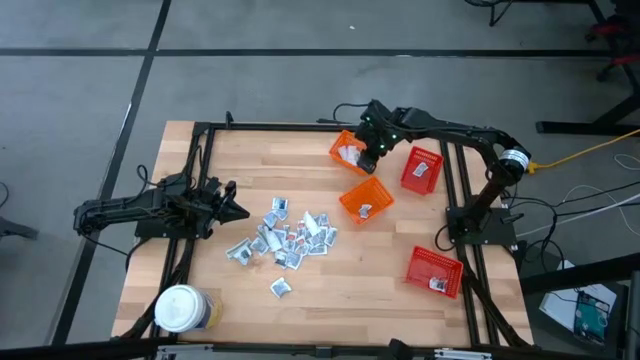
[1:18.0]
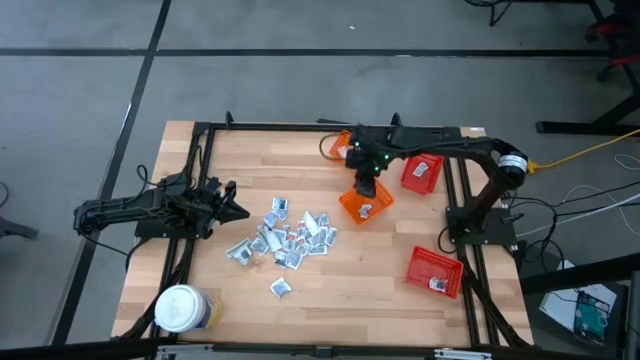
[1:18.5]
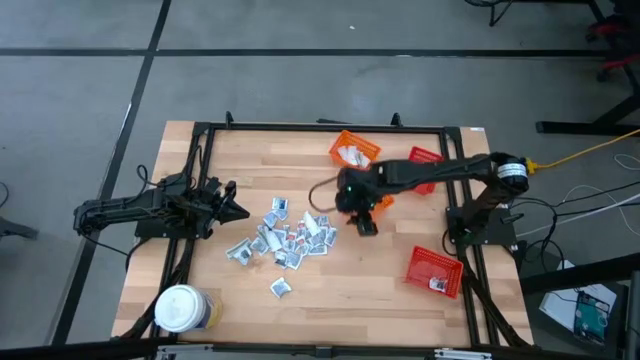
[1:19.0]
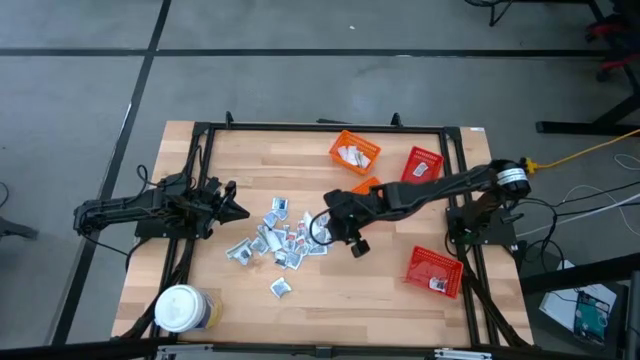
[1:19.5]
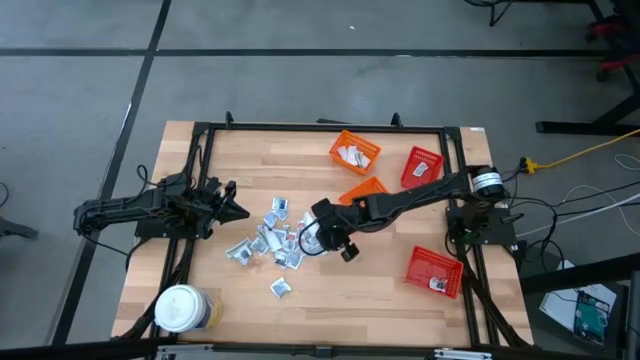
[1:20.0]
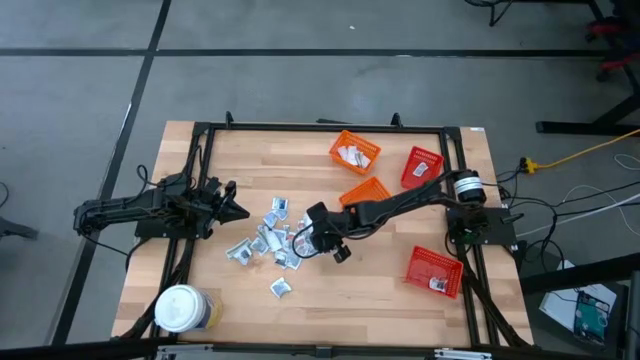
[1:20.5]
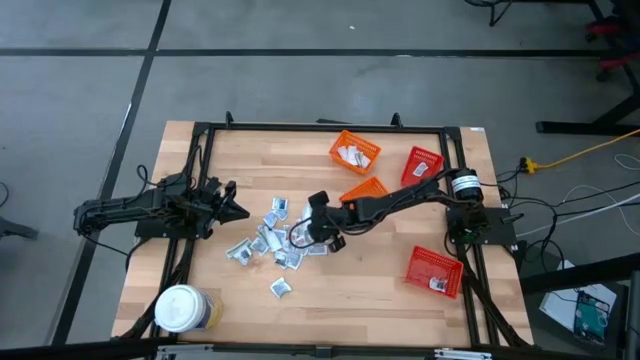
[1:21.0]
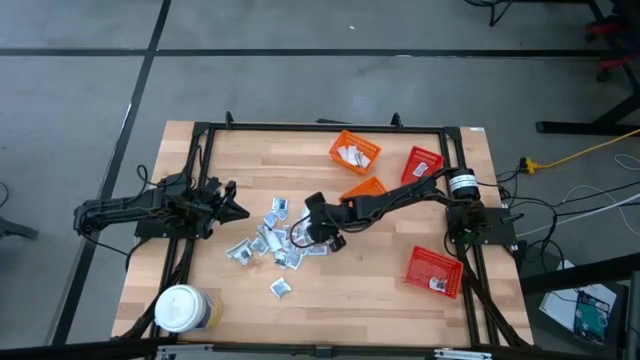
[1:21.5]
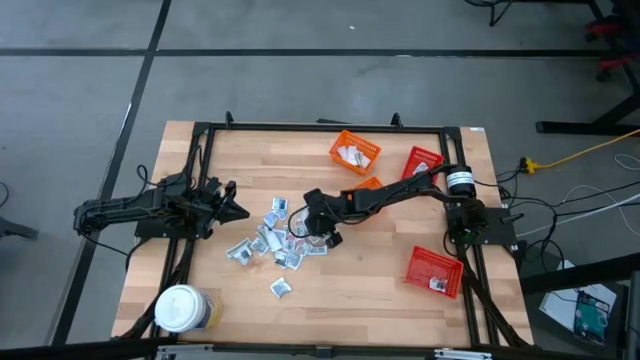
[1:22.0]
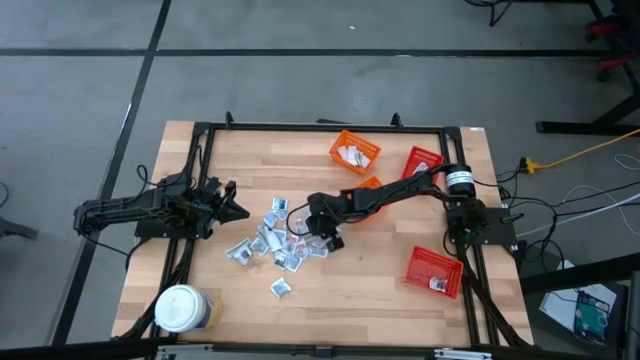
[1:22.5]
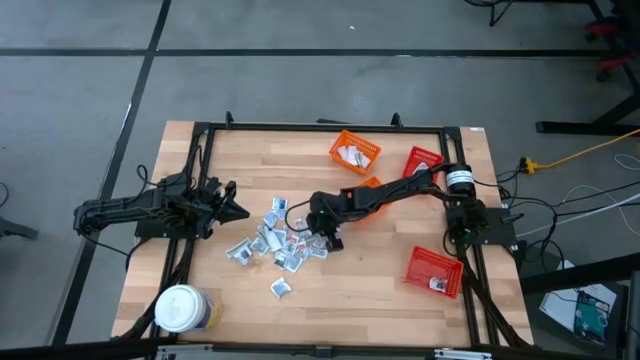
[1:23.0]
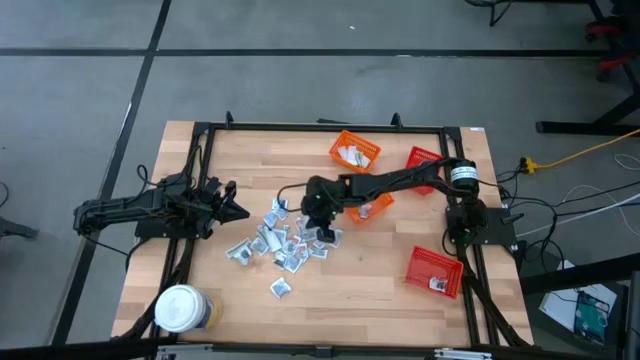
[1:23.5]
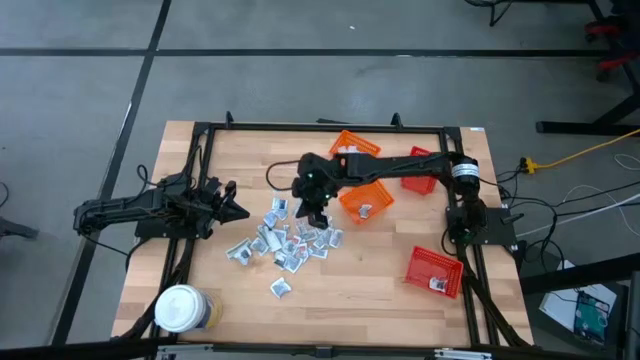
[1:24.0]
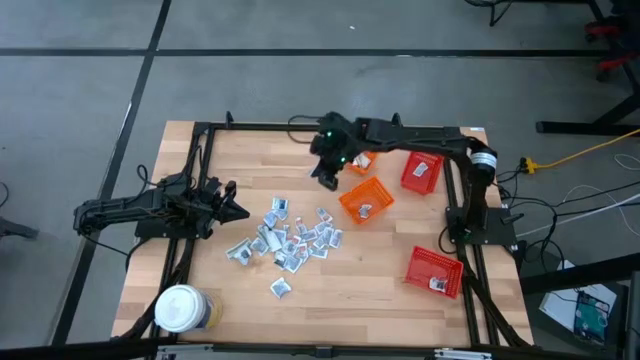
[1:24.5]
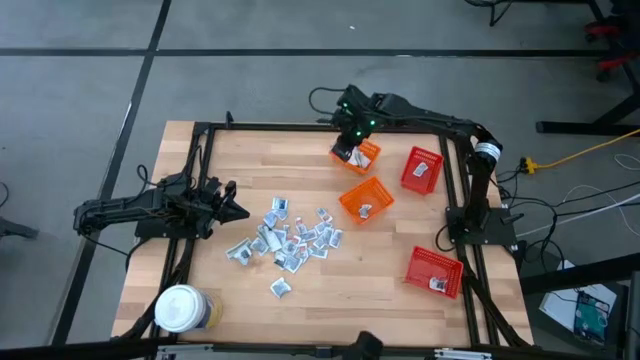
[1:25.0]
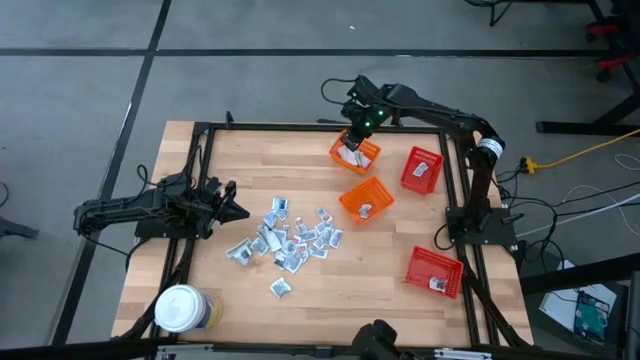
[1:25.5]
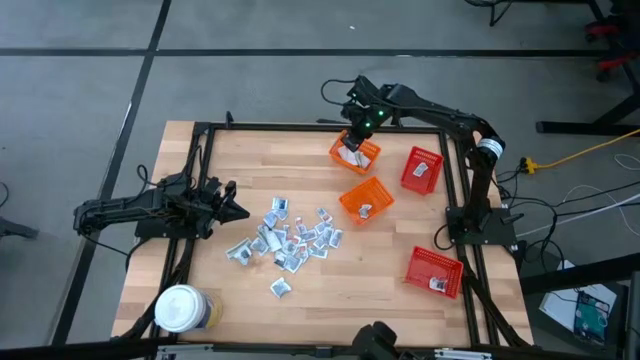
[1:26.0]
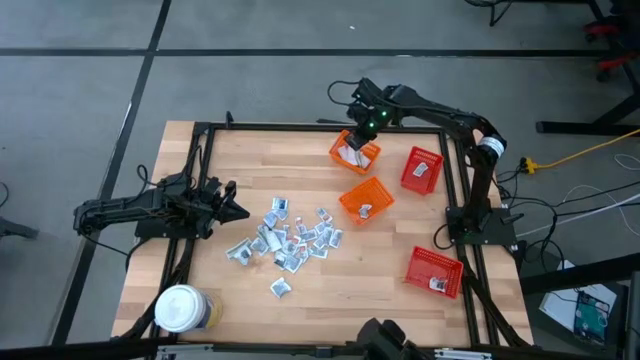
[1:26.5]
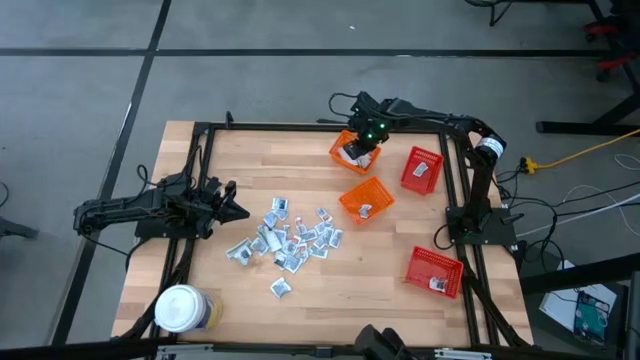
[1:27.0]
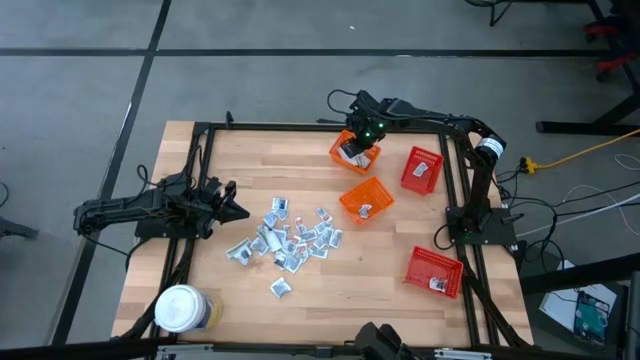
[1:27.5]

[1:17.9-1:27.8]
Task: Pick & Place First Aid Supplies
Put the green bandage pack into the top orange bin

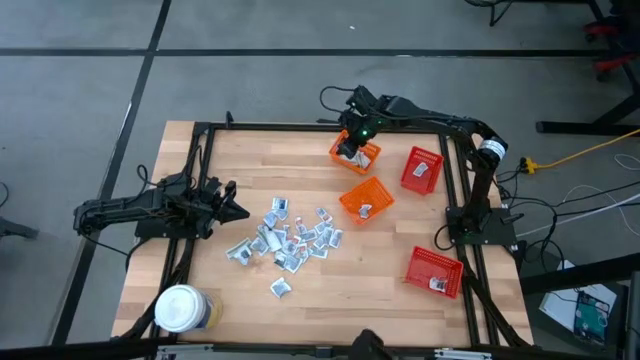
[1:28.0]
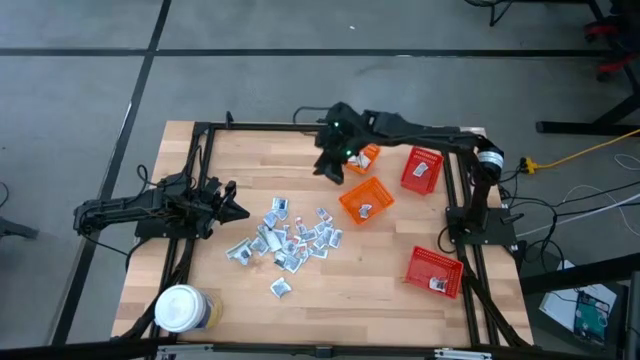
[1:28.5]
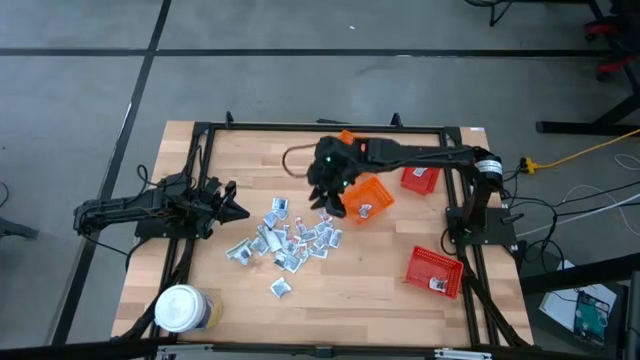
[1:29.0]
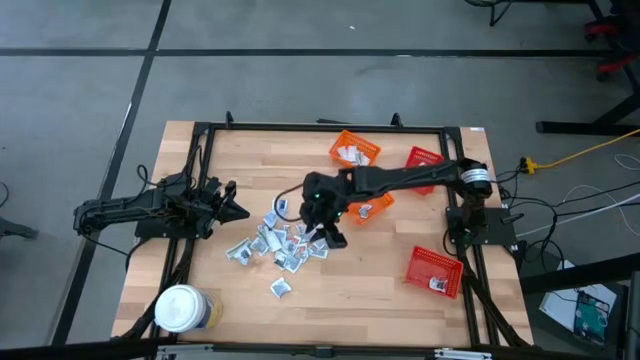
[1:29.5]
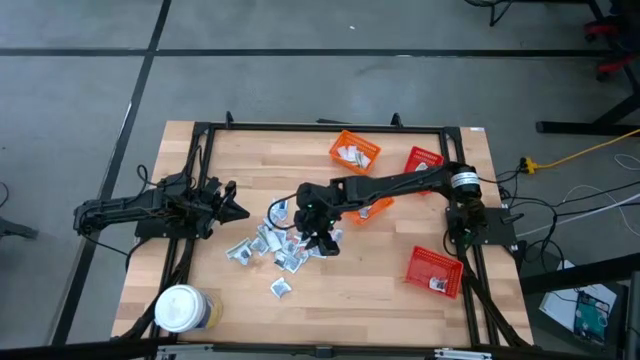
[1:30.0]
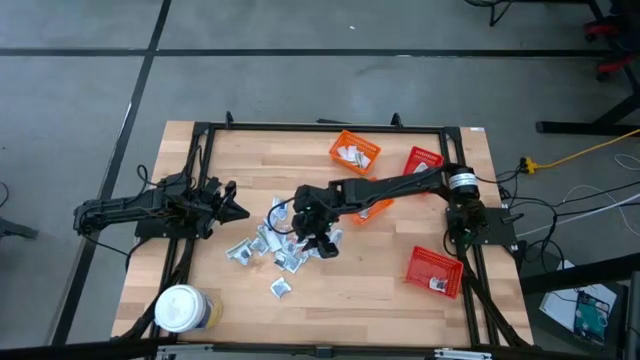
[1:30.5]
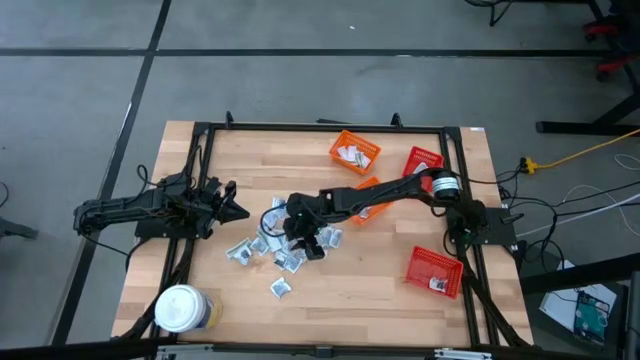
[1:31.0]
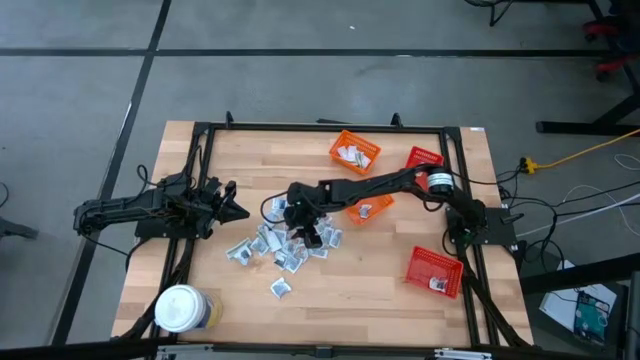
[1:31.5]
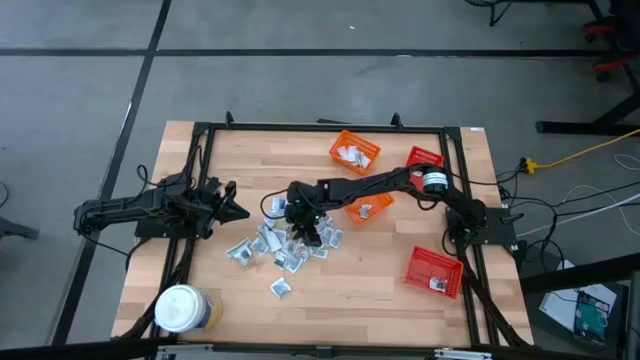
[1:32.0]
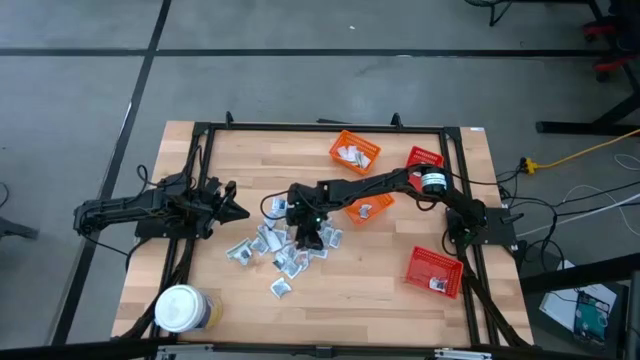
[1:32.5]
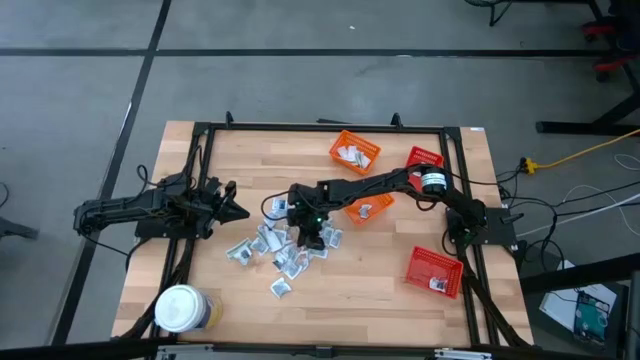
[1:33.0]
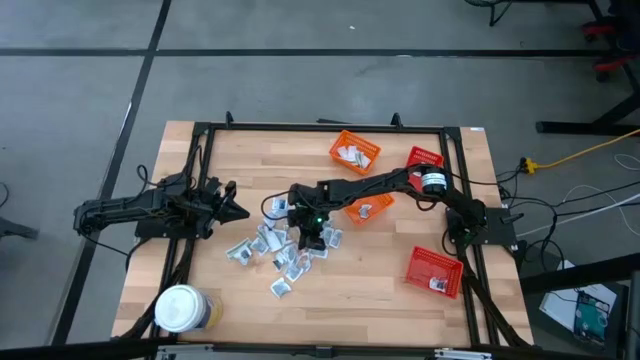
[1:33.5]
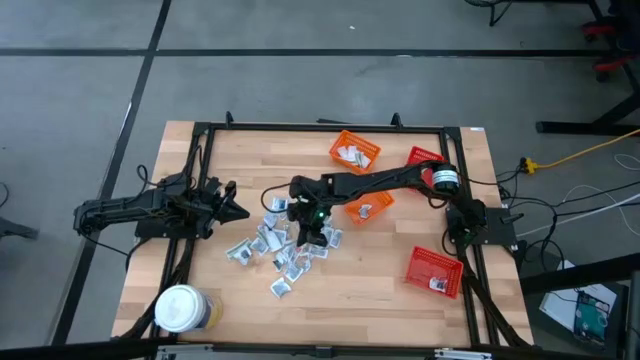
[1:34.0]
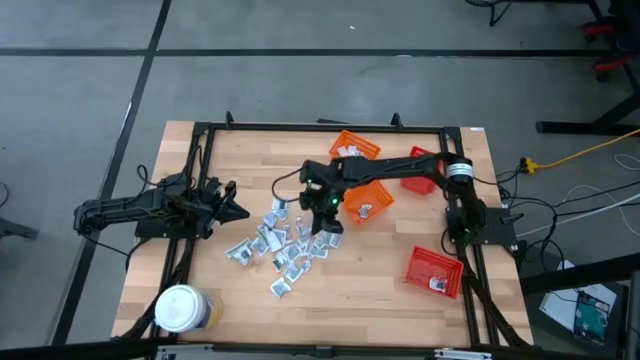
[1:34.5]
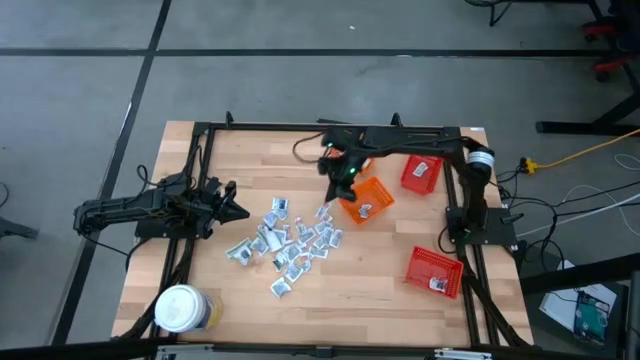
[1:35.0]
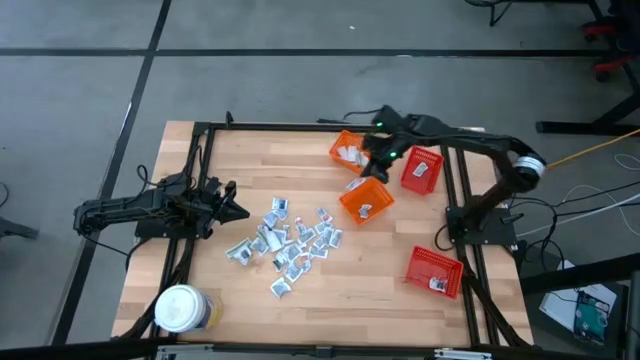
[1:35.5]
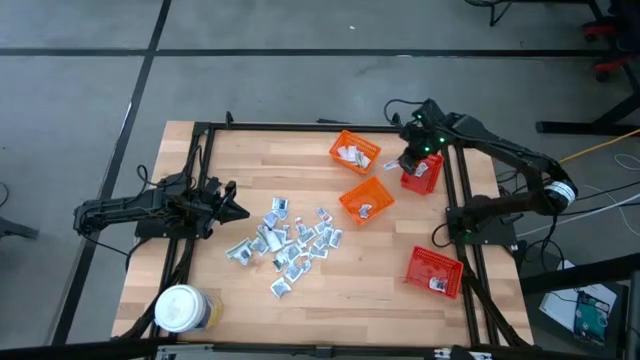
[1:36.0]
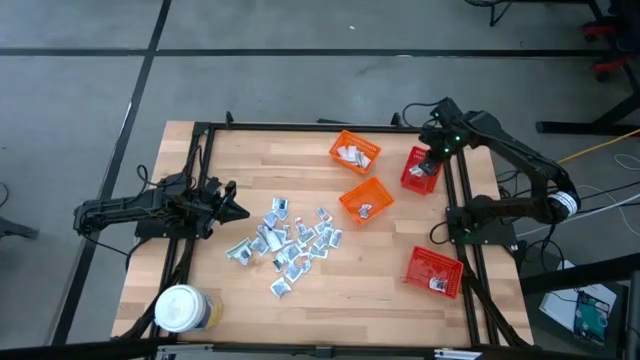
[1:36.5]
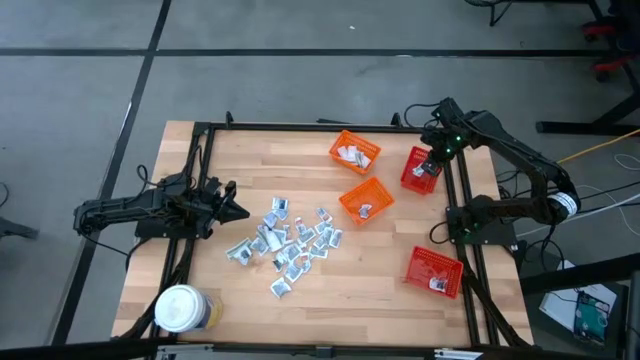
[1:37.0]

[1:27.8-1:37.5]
Put the orange ointment pack into the top red bin

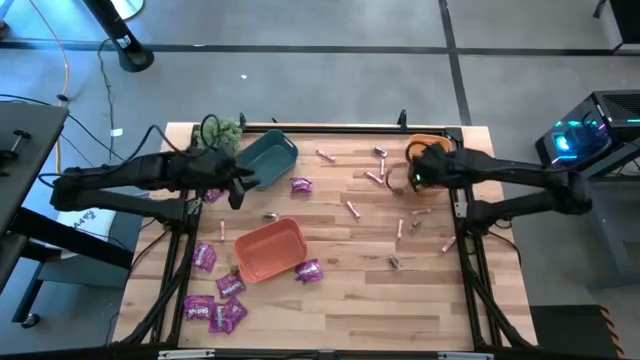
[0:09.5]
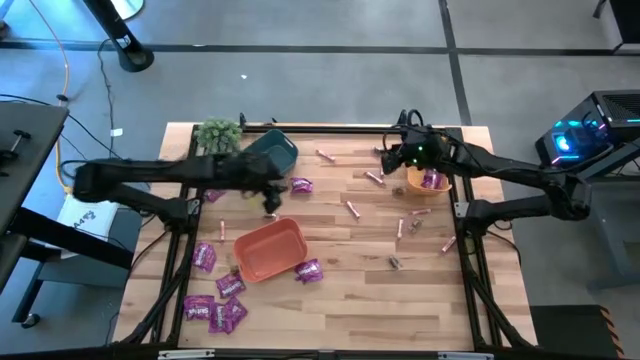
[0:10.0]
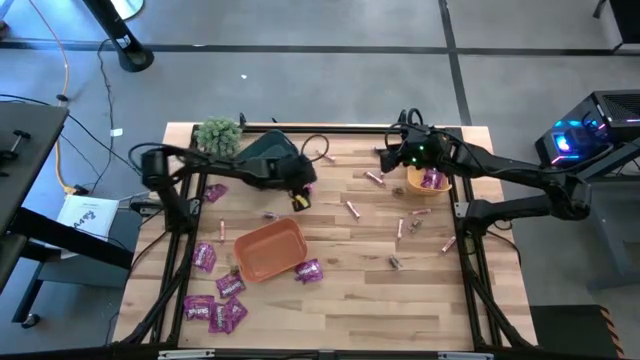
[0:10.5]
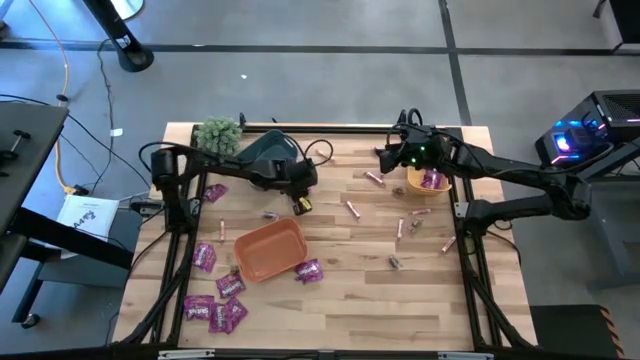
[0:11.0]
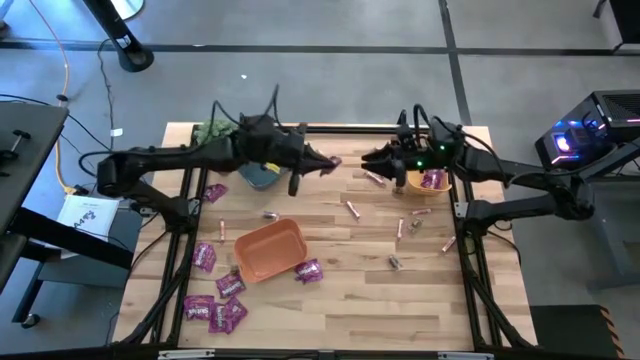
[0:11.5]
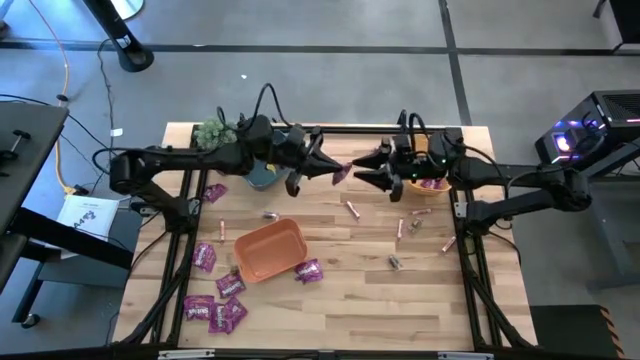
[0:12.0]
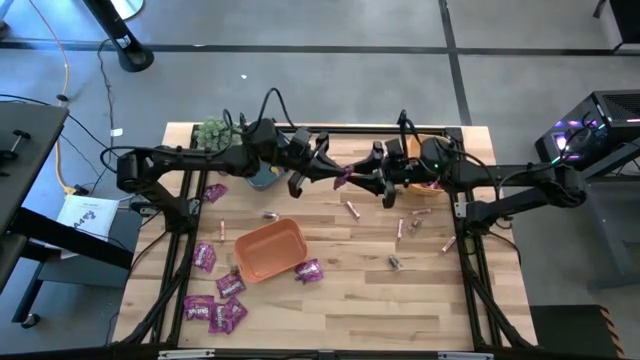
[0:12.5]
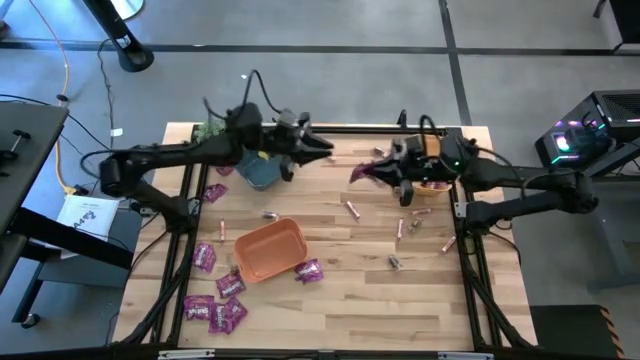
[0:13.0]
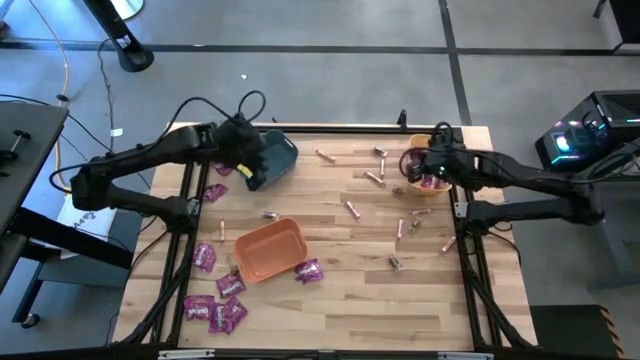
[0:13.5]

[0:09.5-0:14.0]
Task: Sort candy
Put the purple candy into the yellow bin
